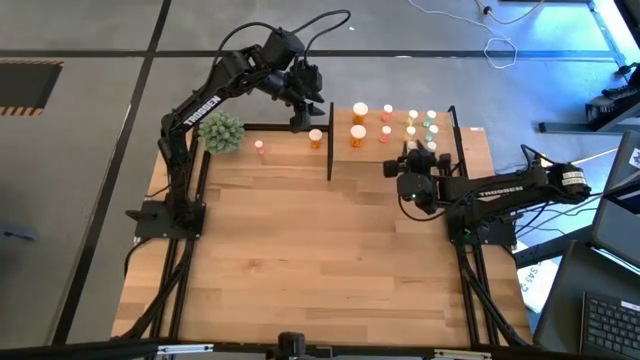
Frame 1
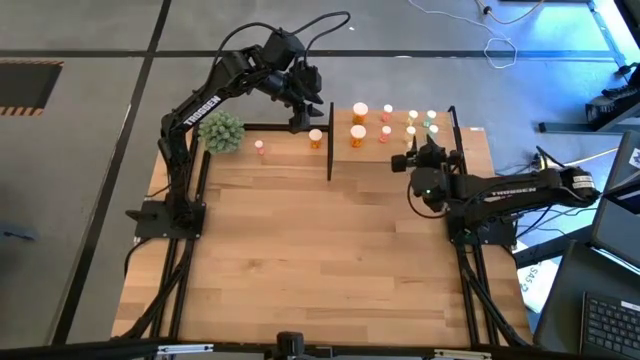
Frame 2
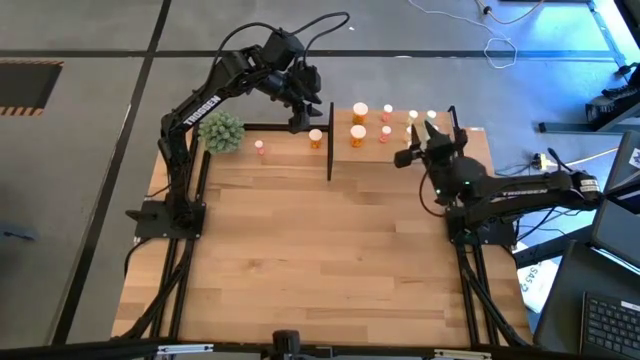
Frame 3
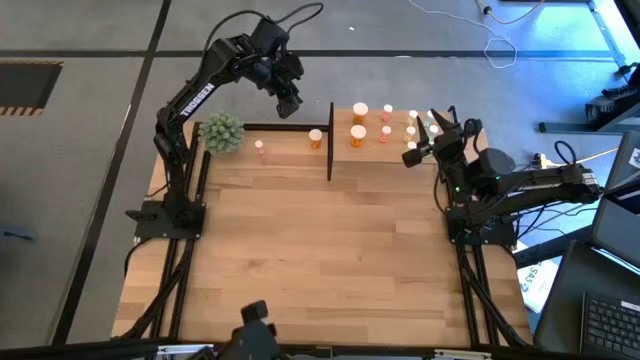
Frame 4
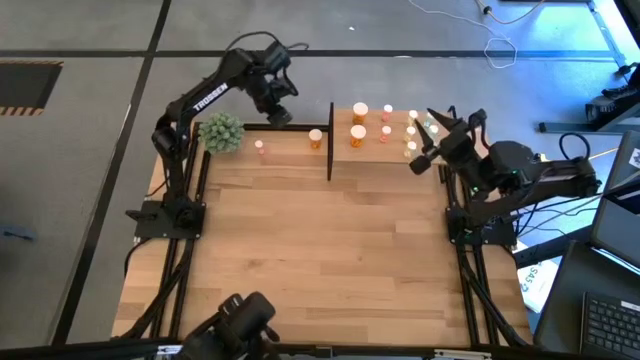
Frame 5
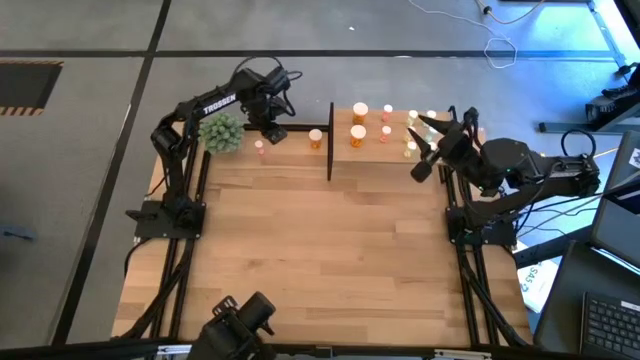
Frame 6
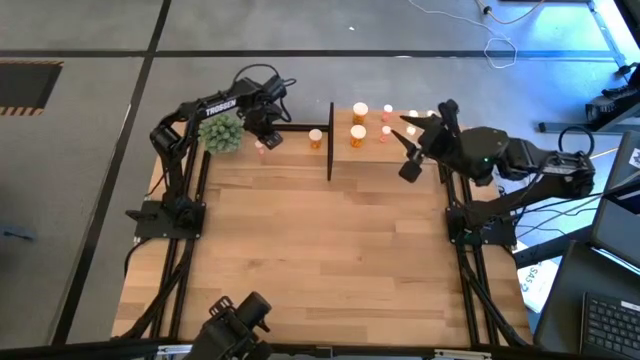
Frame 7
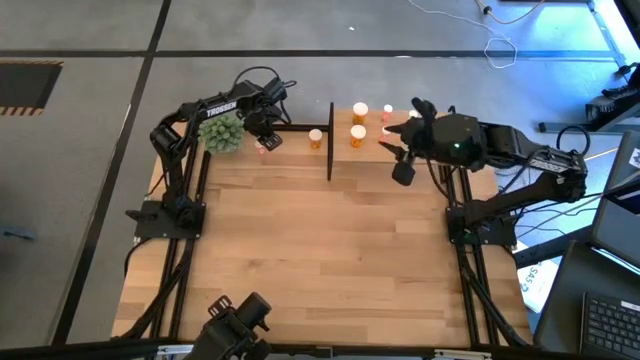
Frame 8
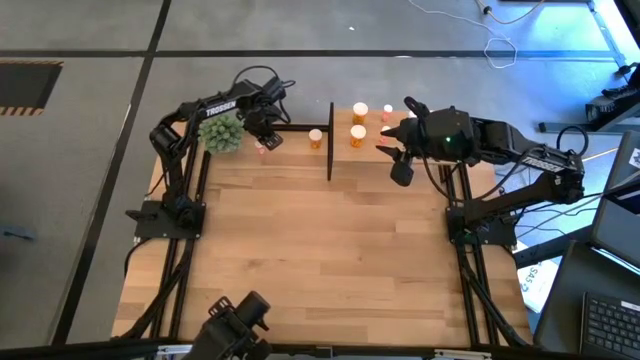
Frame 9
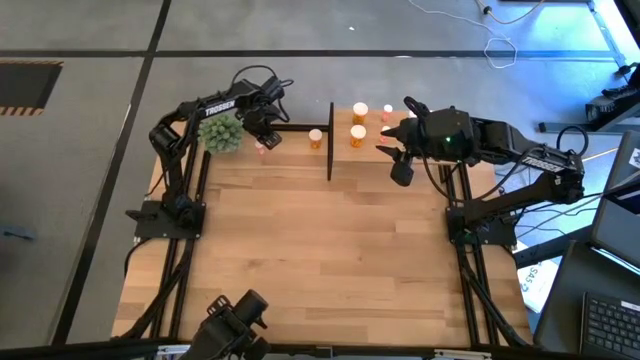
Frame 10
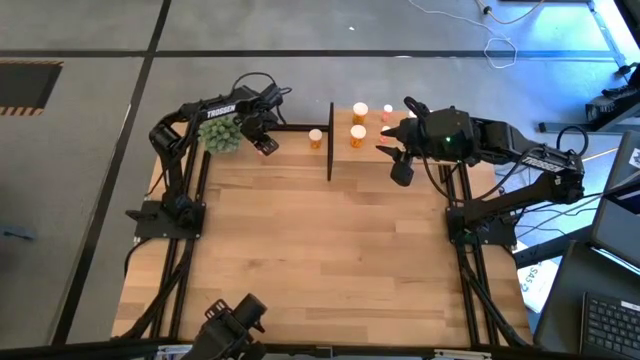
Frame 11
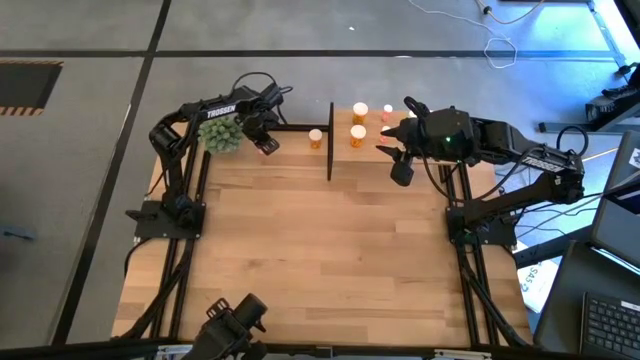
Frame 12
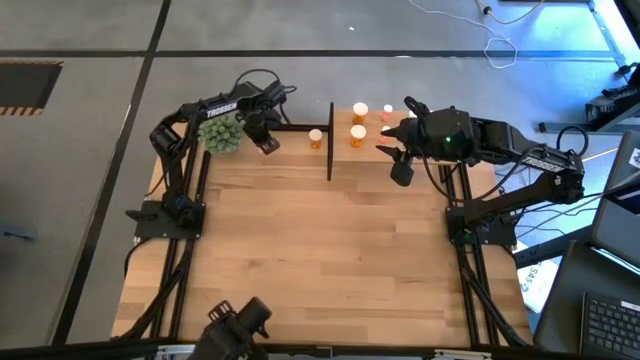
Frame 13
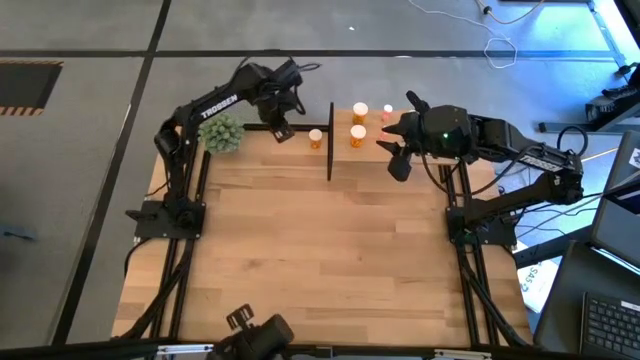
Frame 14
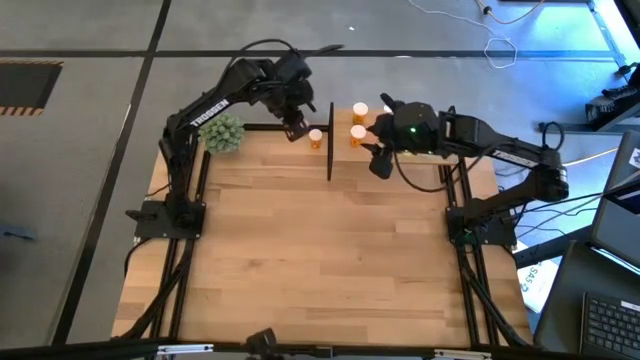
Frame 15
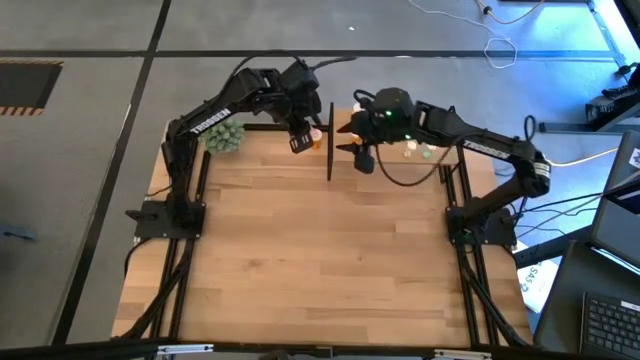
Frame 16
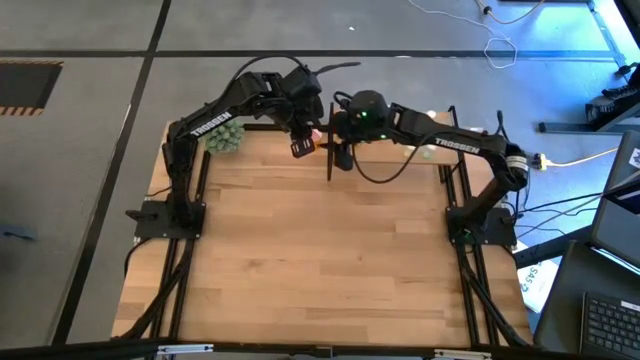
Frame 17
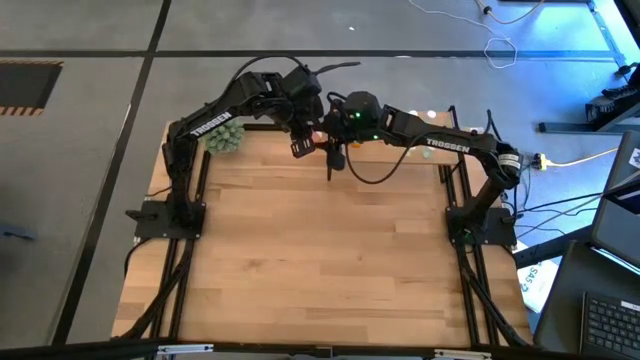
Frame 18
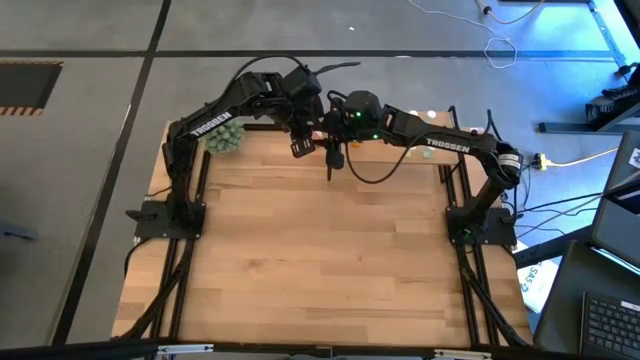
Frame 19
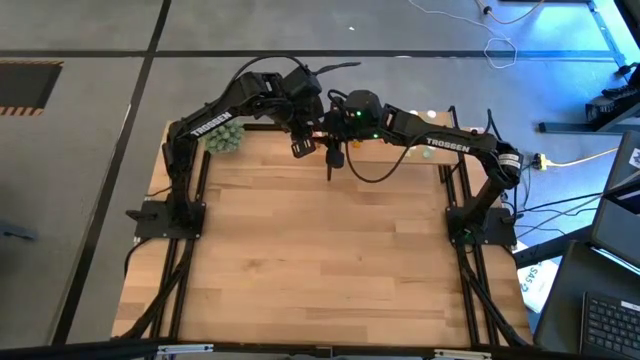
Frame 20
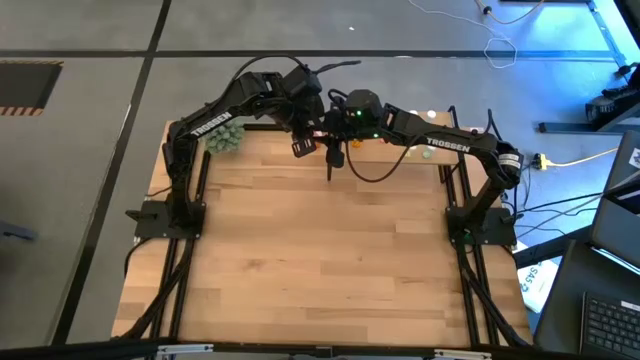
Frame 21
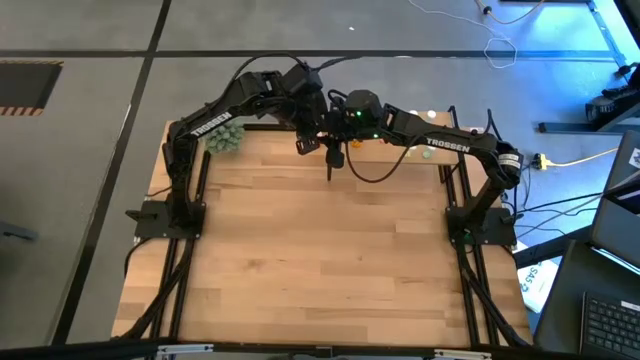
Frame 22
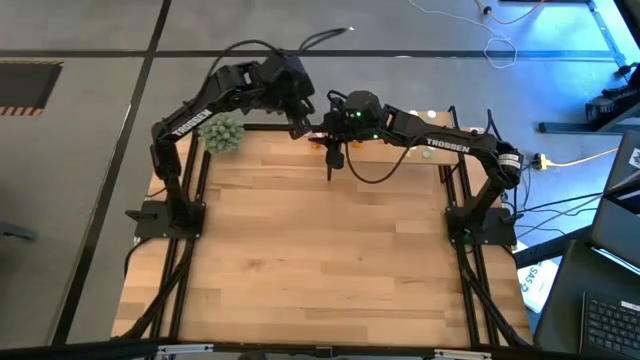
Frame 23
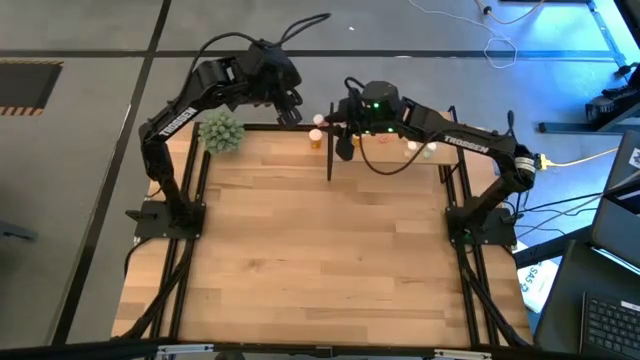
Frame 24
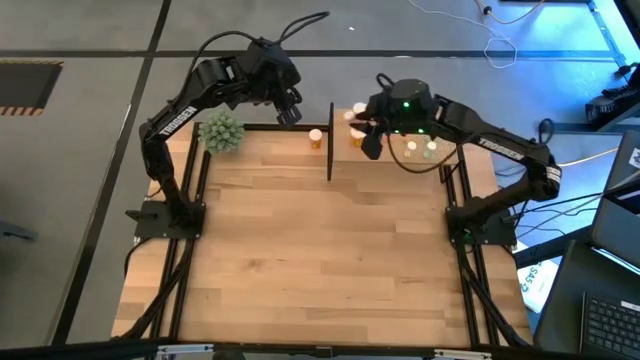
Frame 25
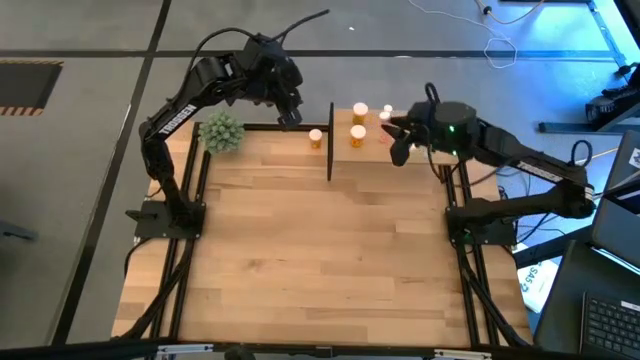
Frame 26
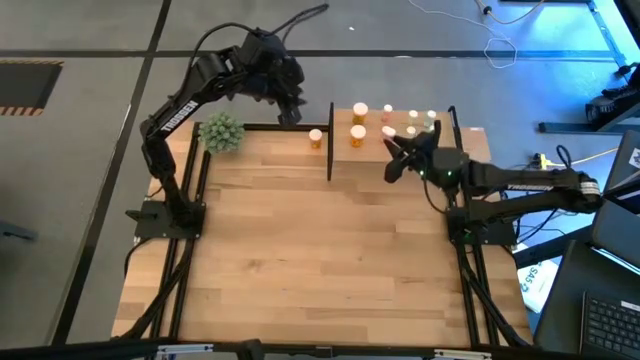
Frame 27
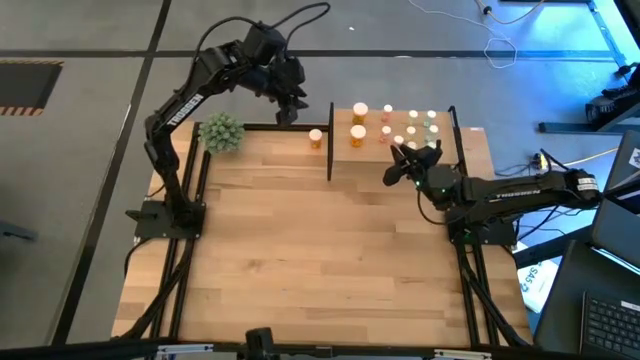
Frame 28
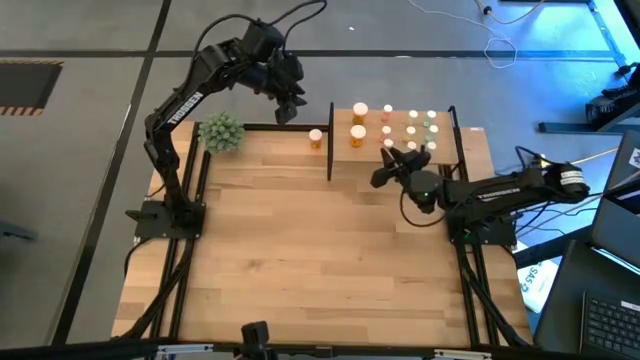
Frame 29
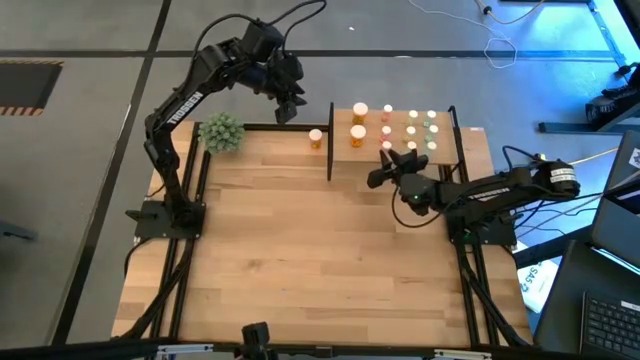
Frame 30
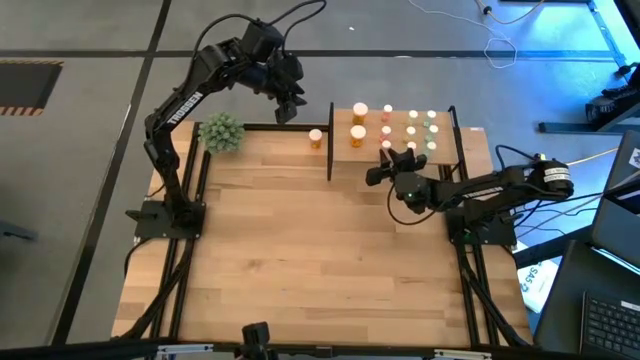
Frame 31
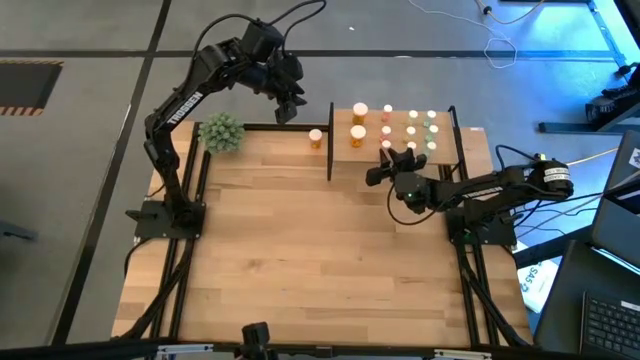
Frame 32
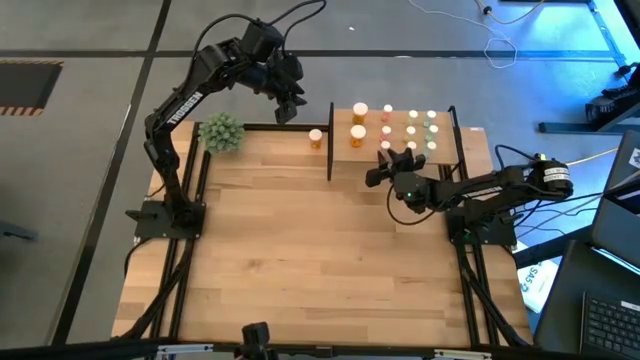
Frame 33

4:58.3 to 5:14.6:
Task: Pick and place medicine bottles onto shelf by color
Put the pink pill bottle on the shelf aligned with the other pink pill bottles

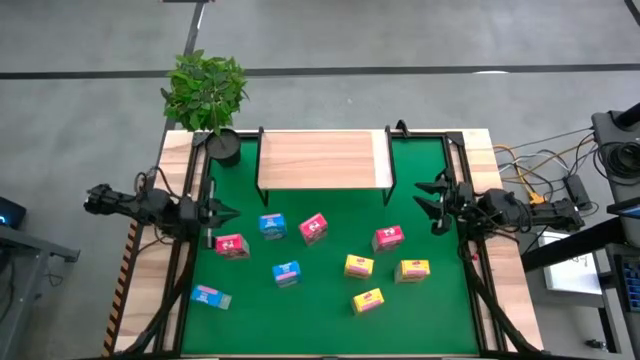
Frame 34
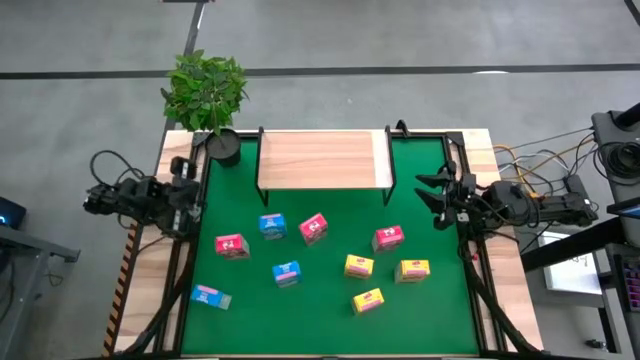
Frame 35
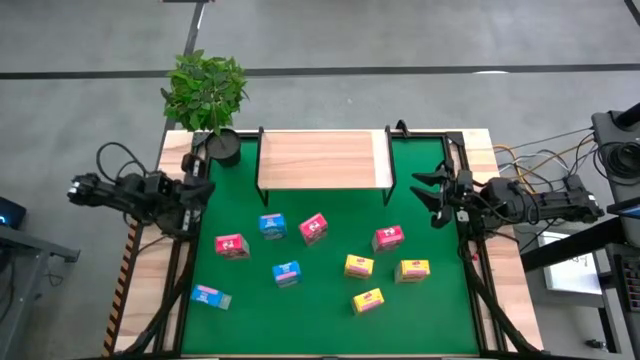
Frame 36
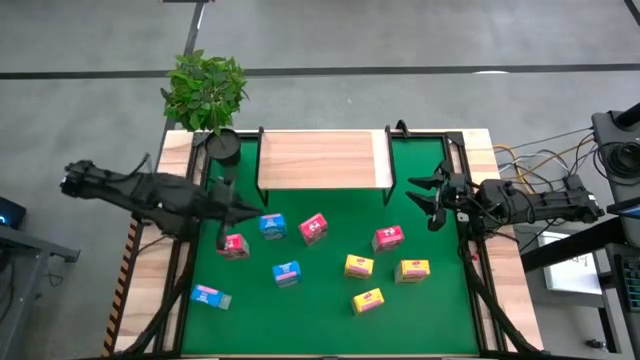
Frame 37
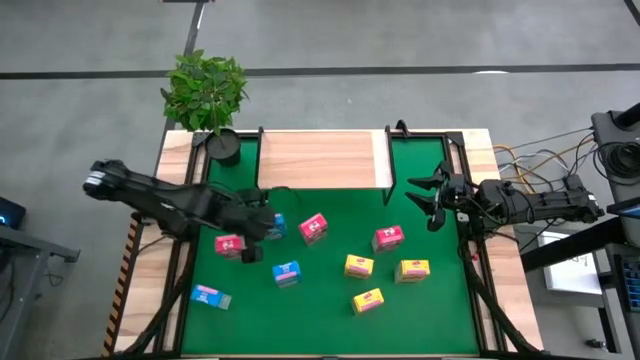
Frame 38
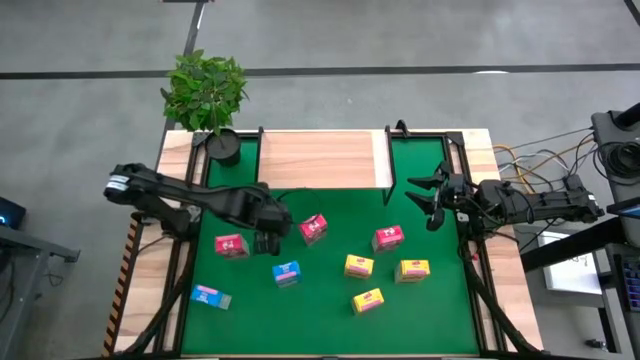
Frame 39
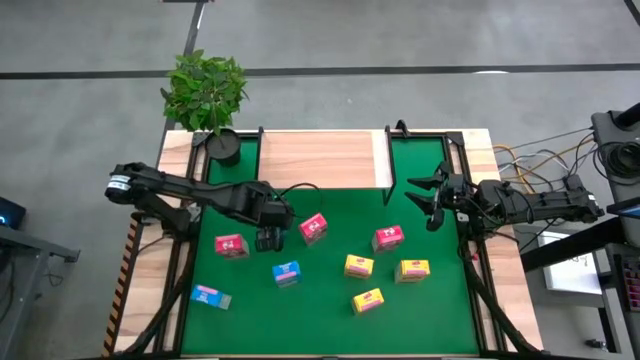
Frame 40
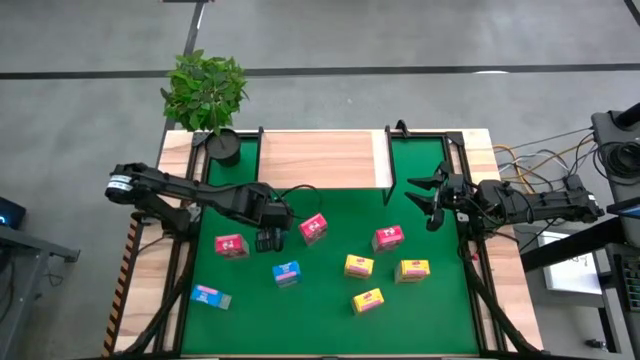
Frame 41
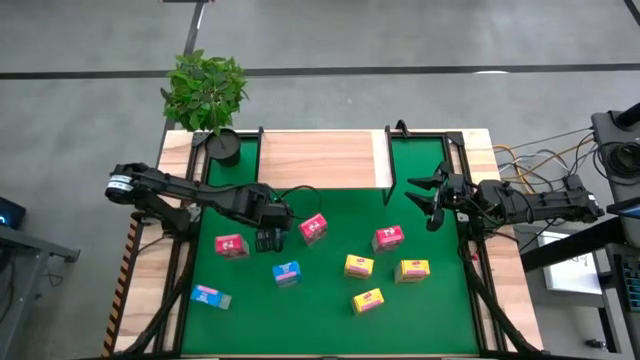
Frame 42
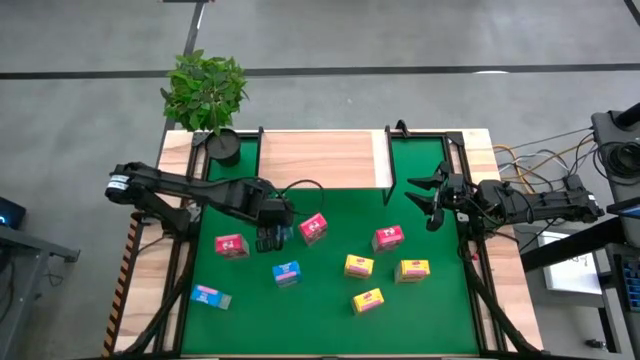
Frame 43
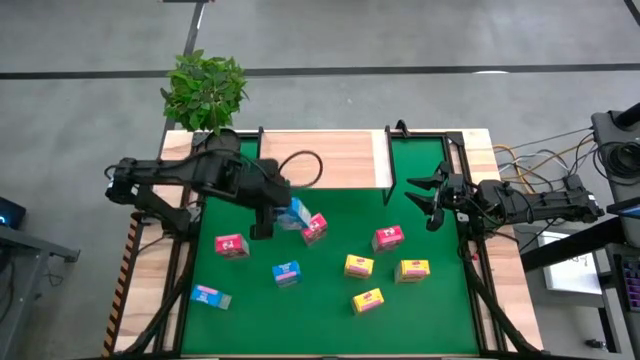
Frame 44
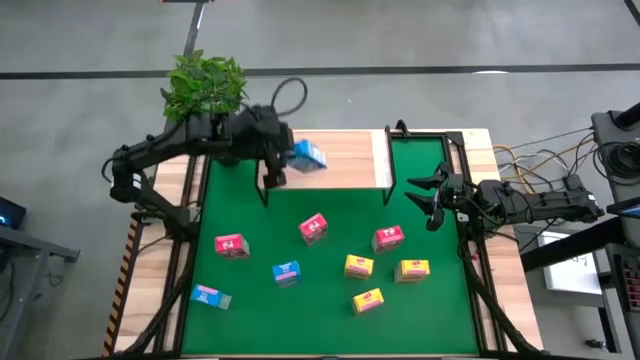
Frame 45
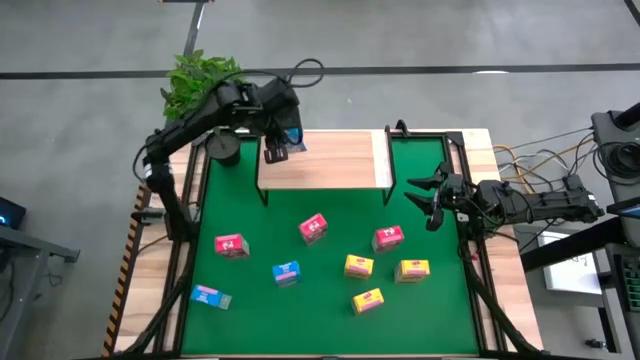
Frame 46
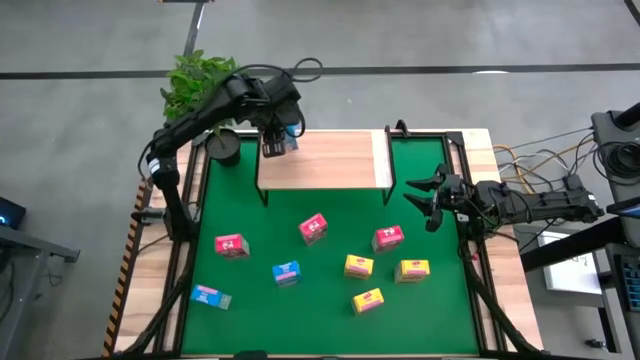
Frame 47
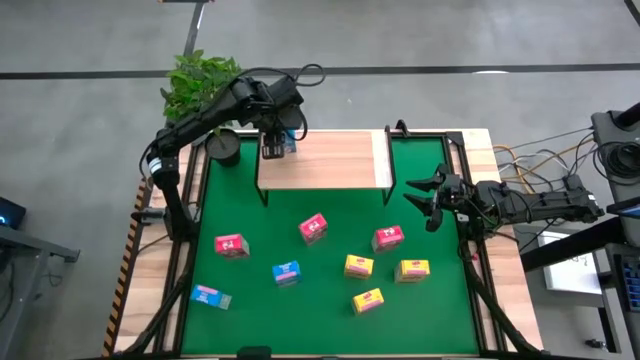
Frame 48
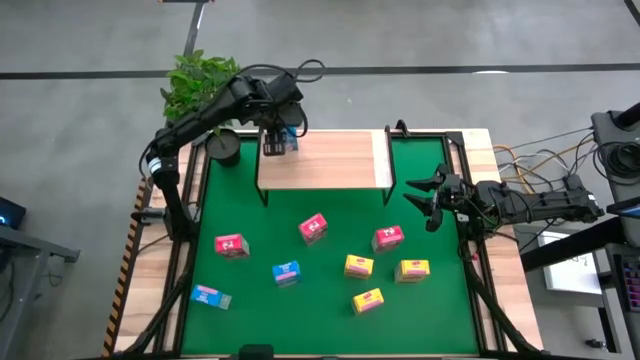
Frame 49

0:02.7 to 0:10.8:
Task: Stack cereal on shelf
Put the top blue cereal box on the shelf
